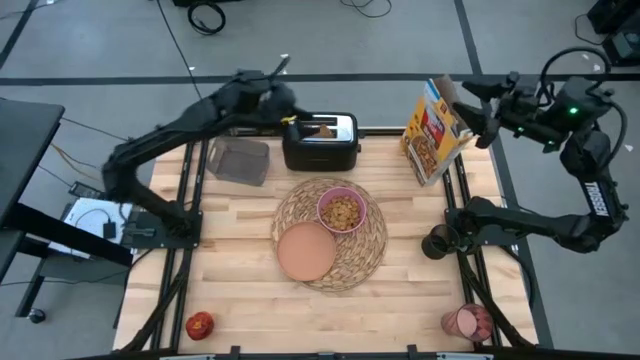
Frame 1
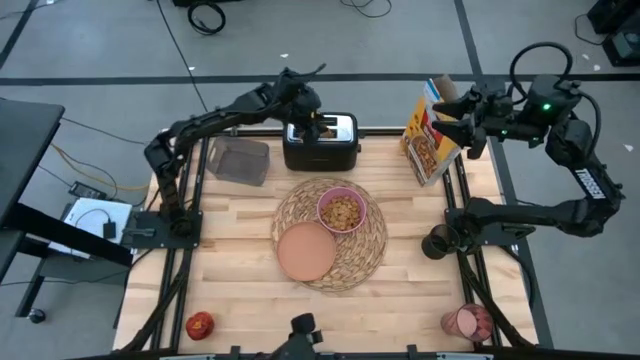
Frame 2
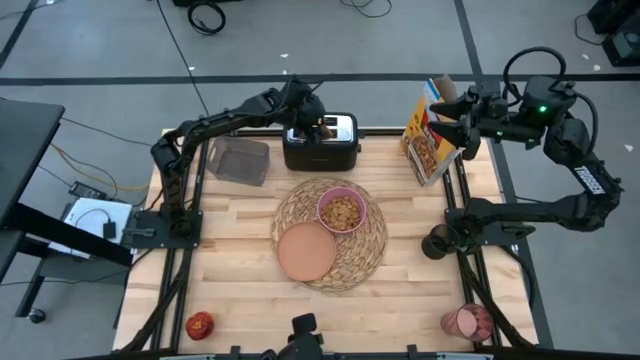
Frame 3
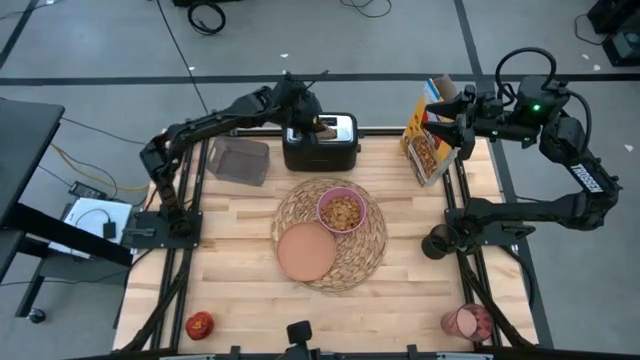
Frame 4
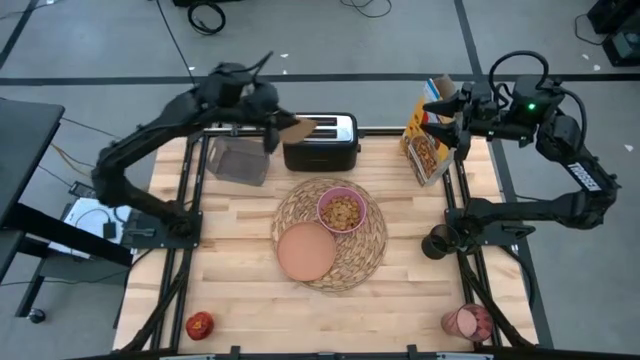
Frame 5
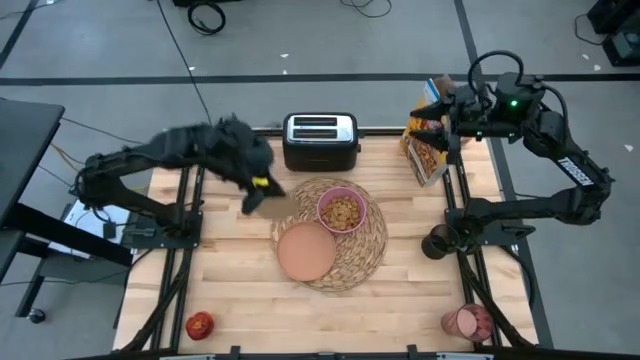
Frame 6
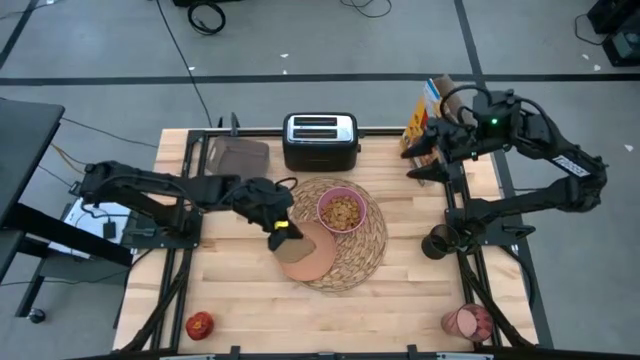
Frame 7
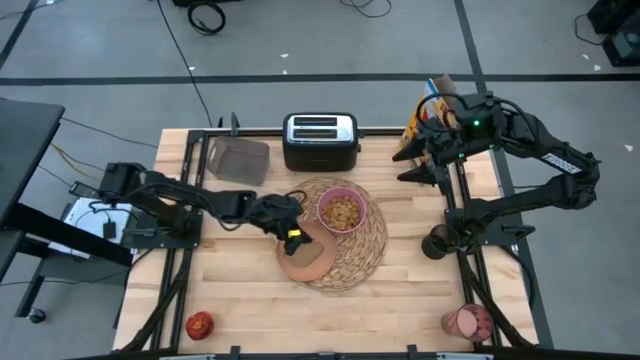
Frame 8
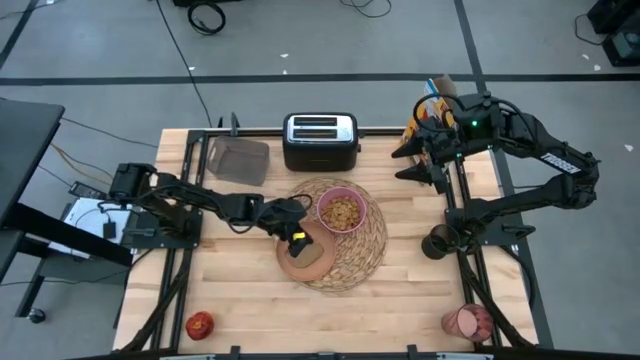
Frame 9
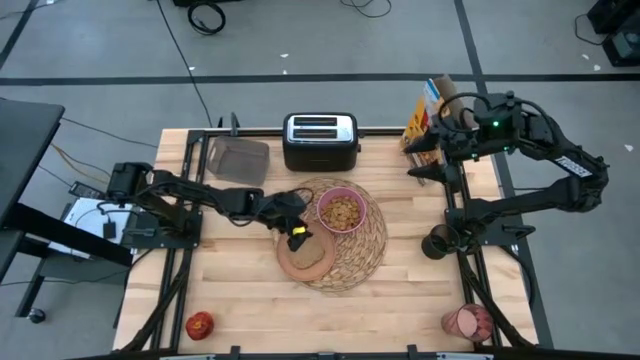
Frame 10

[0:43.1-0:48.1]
Task: Arrange a breakfast setting
Put the toasted bread from the toaster on the brown plate on the brown placemat

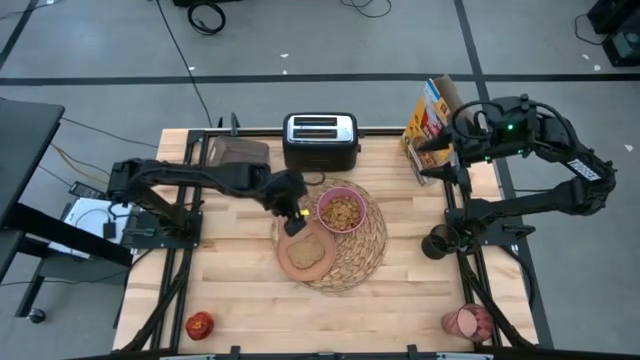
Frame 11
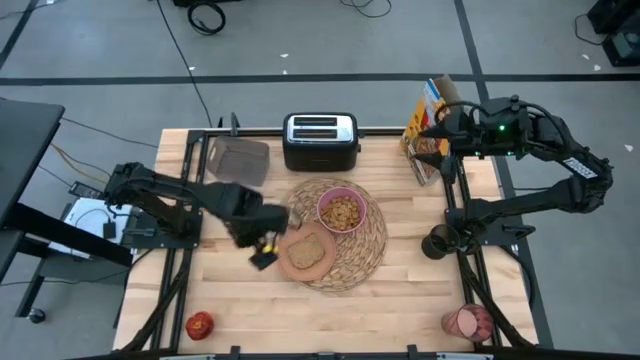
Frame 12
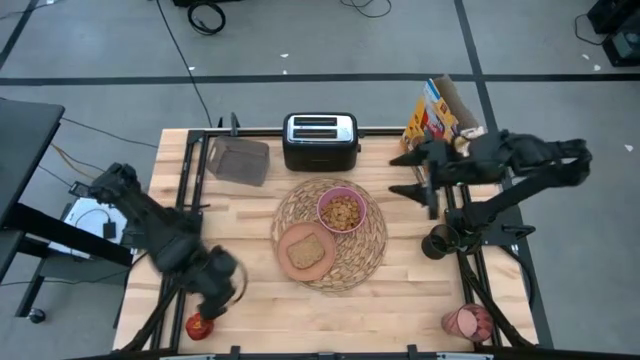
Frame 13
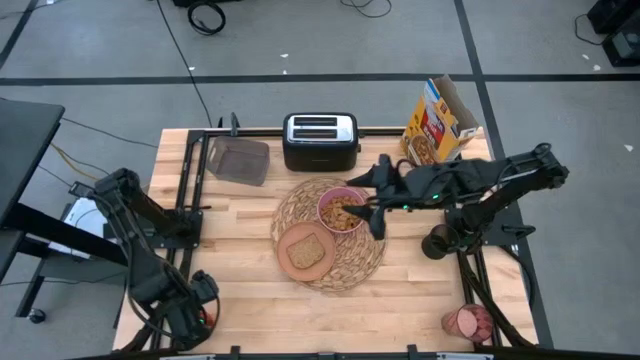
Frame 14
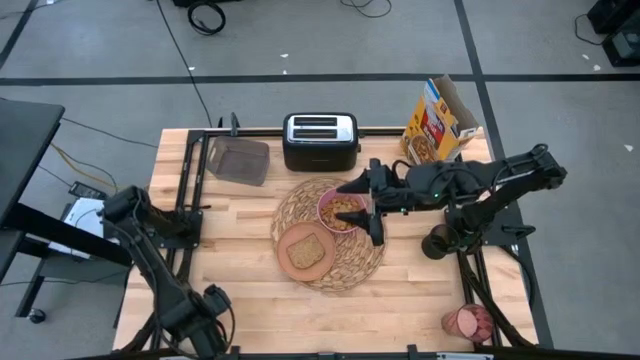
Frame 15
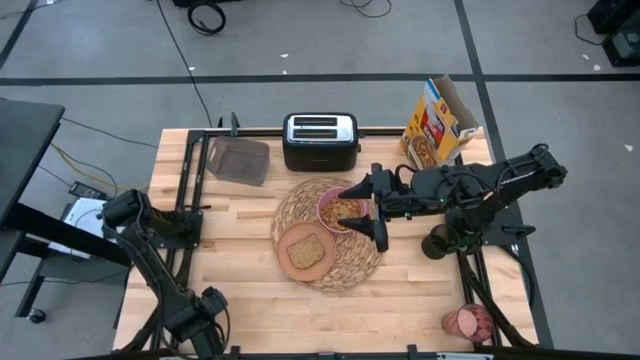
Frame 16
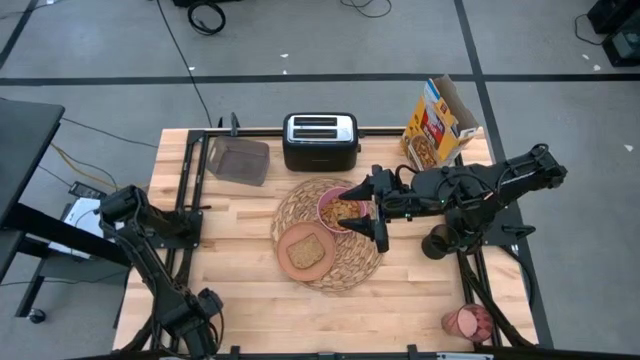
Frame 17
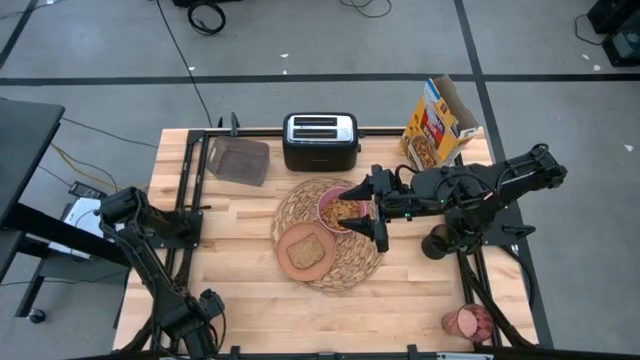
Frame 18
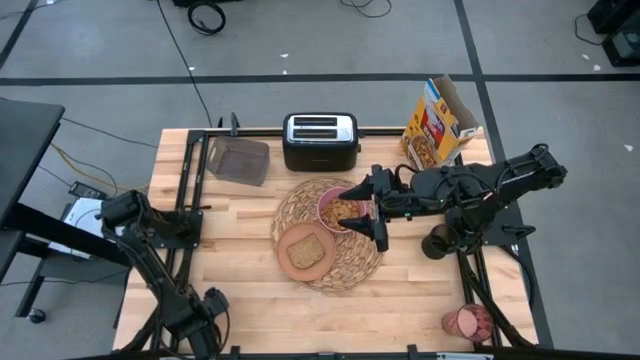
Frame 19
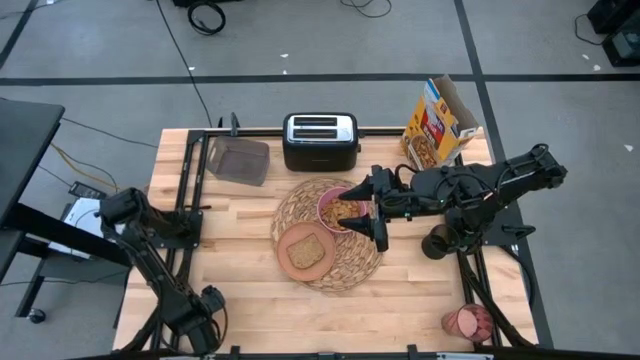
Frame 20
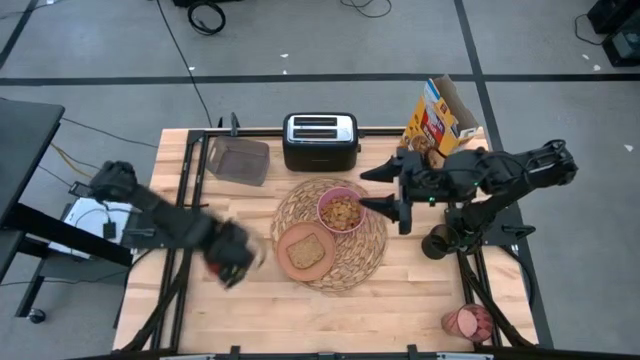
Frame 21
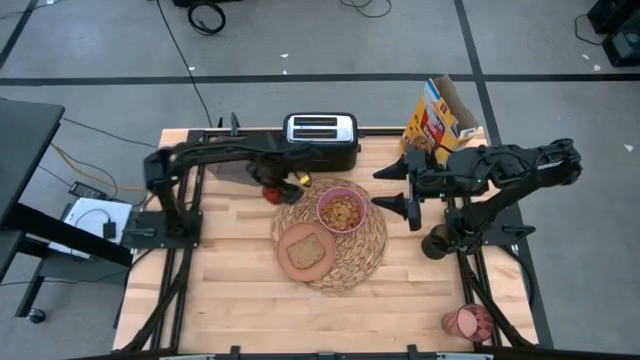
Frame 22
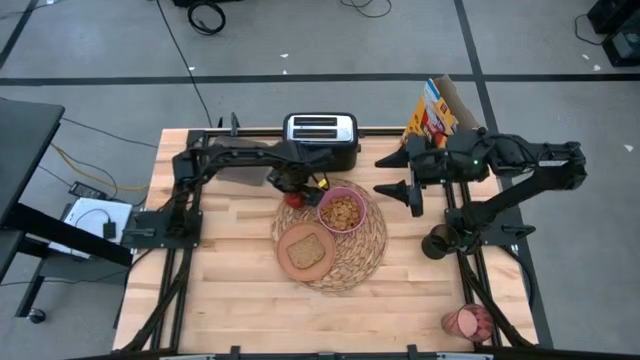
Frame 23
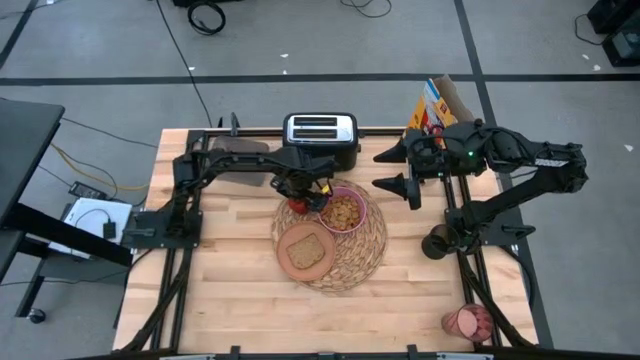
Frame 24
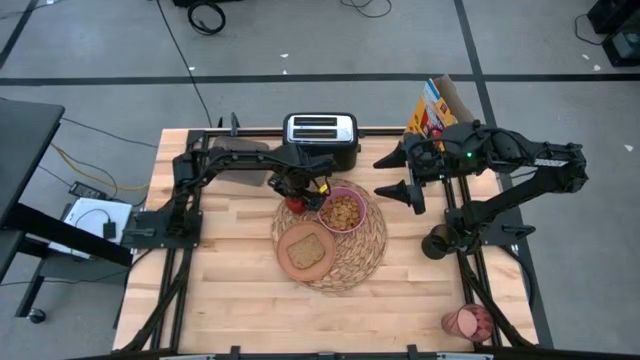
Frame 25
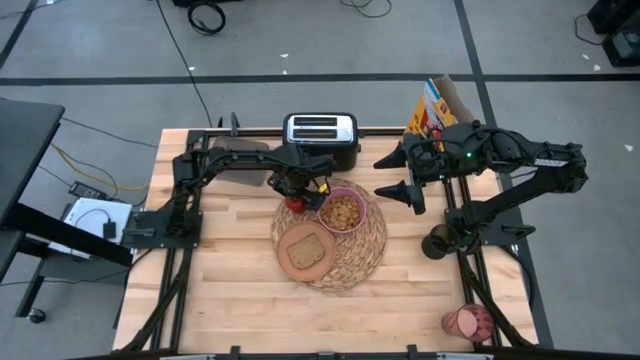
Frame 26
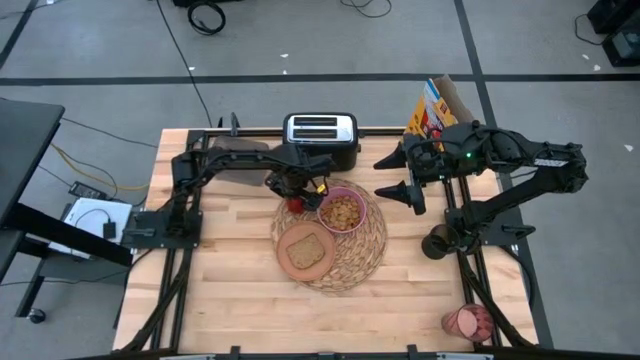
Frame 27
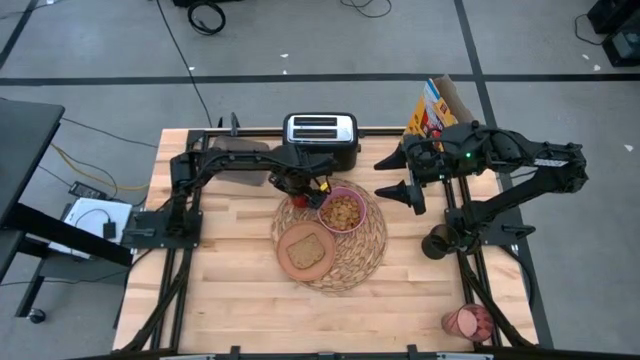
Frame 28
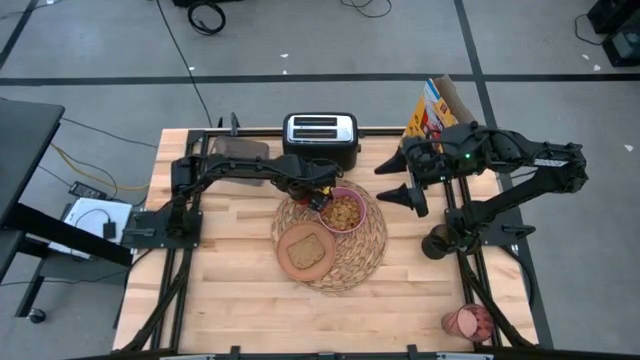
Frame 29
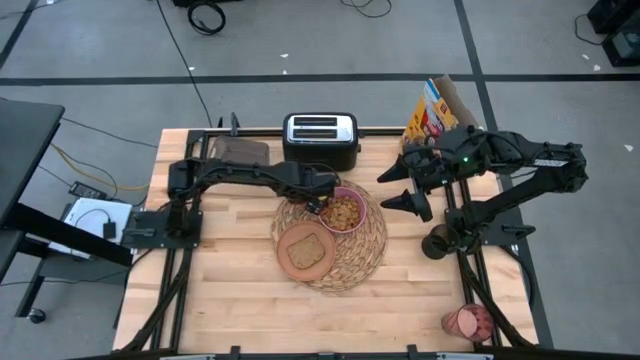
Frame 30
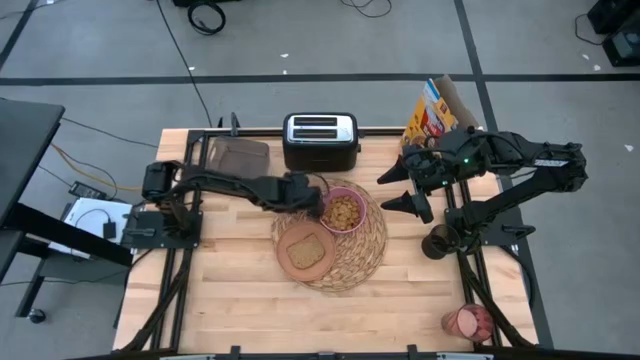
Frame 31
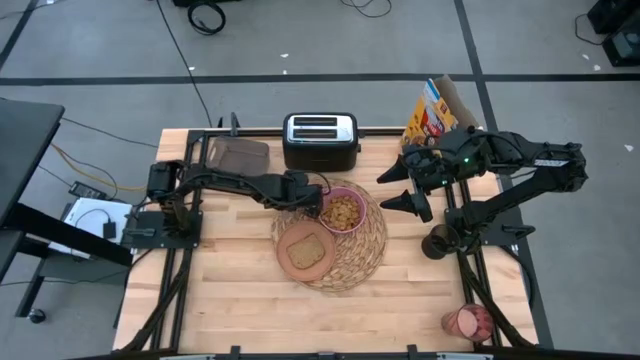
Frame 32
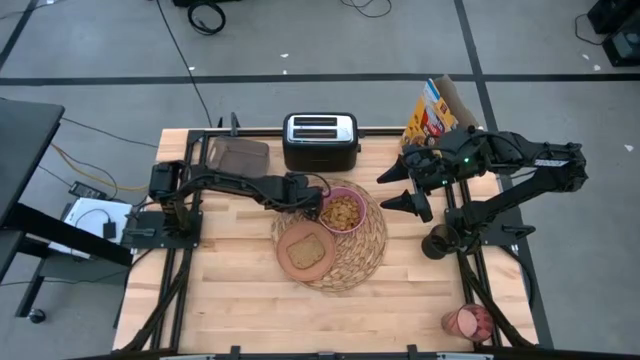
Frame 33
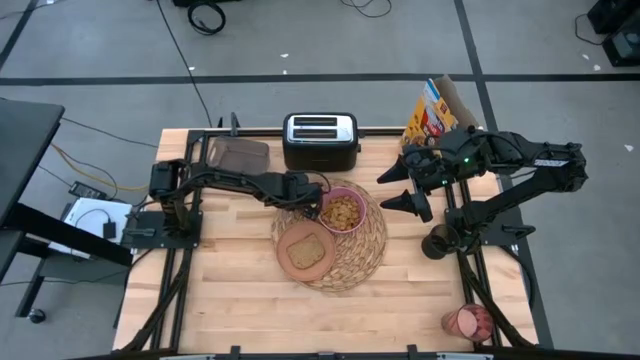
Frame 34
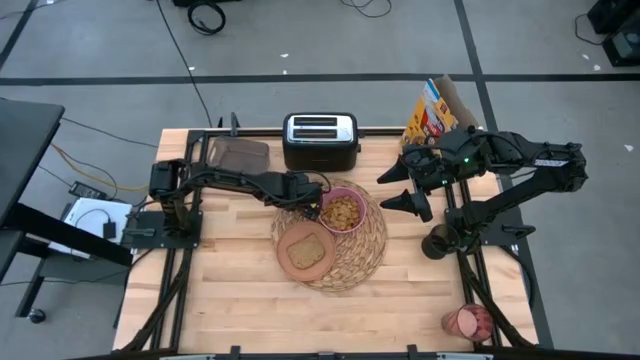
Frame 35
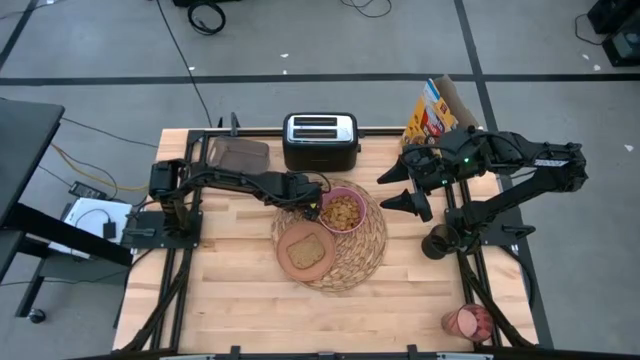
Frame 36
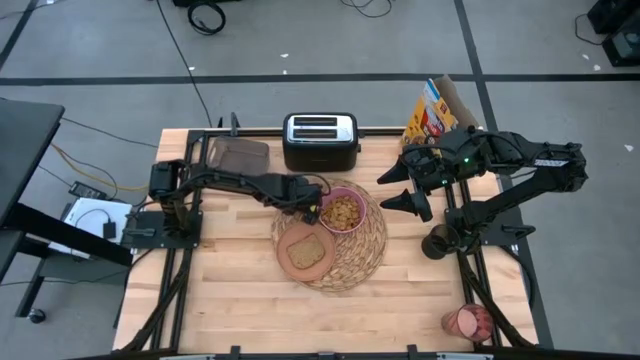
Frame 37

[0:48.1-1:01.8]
Put the red apple to the top right of the pink bowl on the brown placemat
